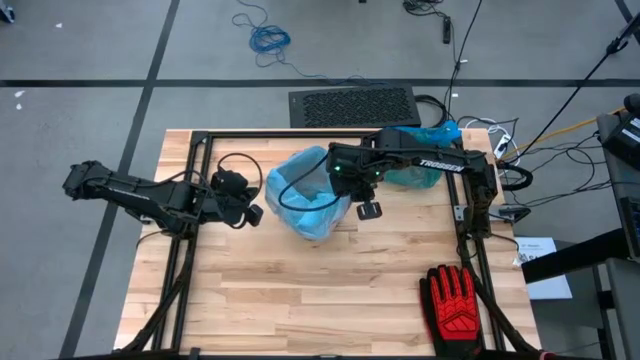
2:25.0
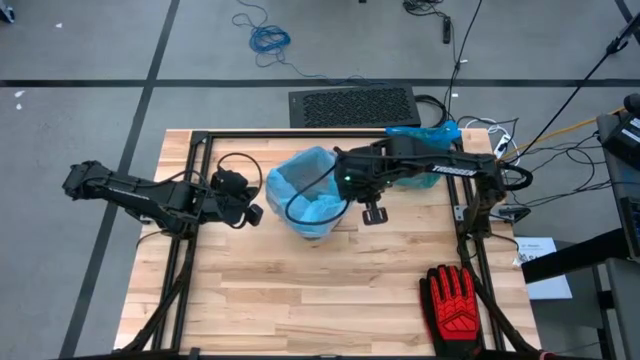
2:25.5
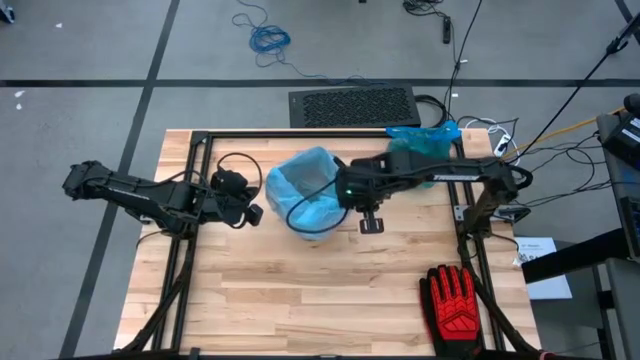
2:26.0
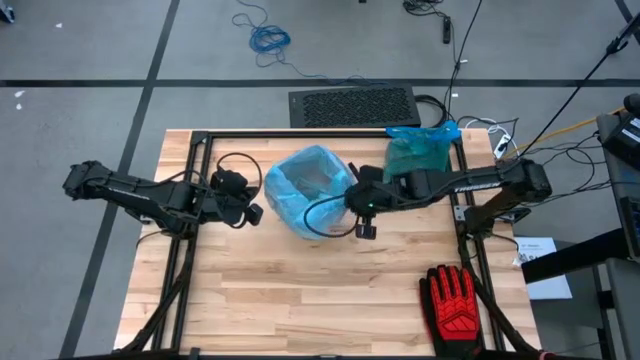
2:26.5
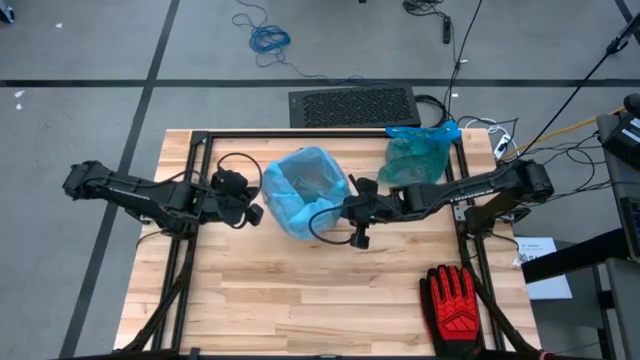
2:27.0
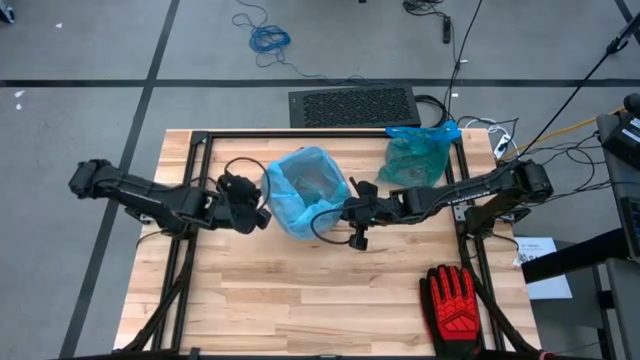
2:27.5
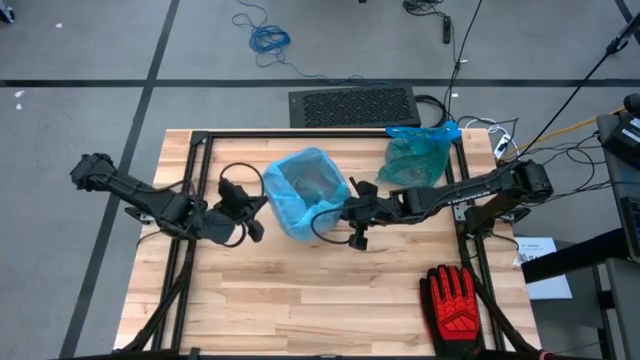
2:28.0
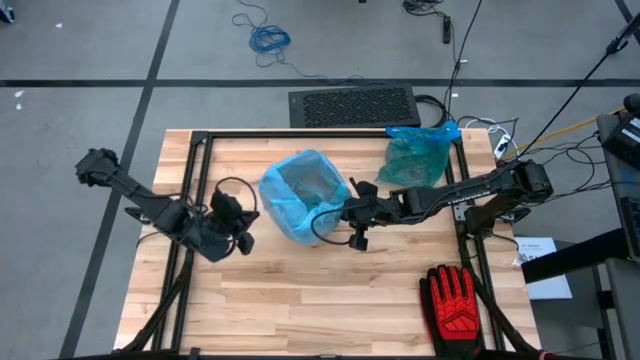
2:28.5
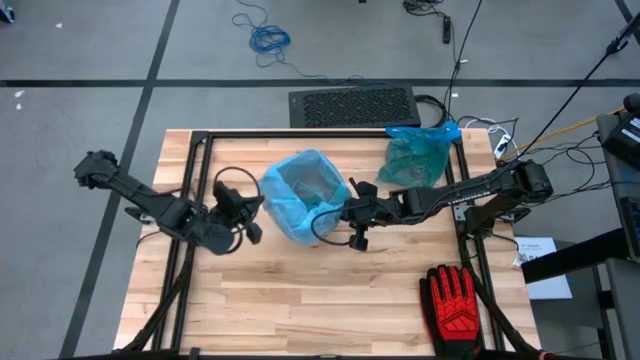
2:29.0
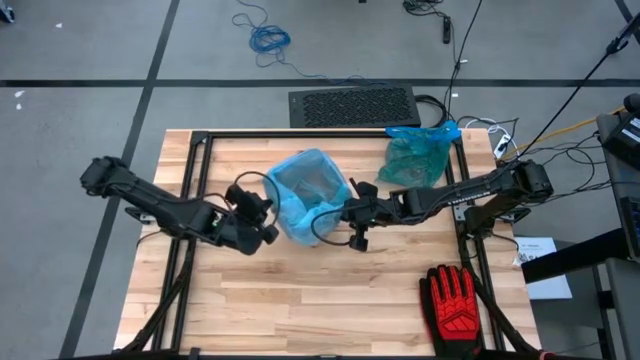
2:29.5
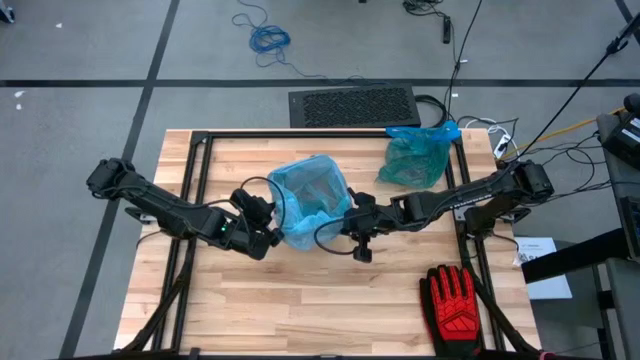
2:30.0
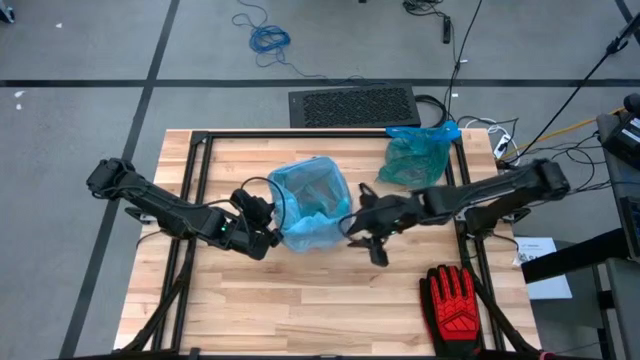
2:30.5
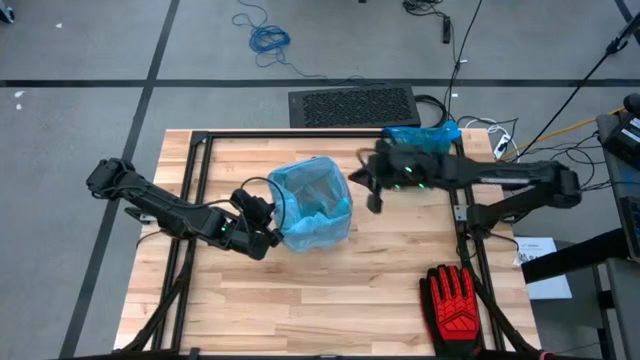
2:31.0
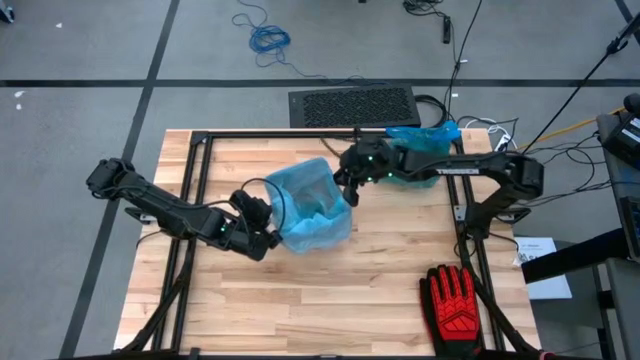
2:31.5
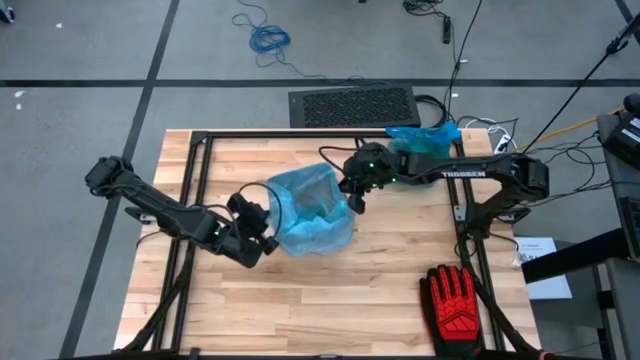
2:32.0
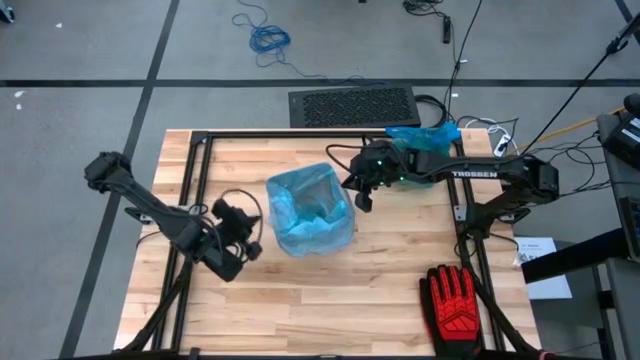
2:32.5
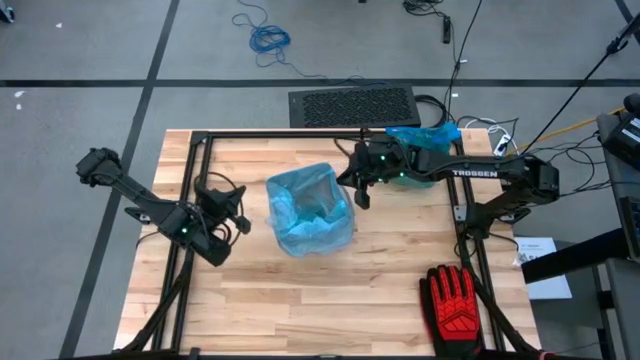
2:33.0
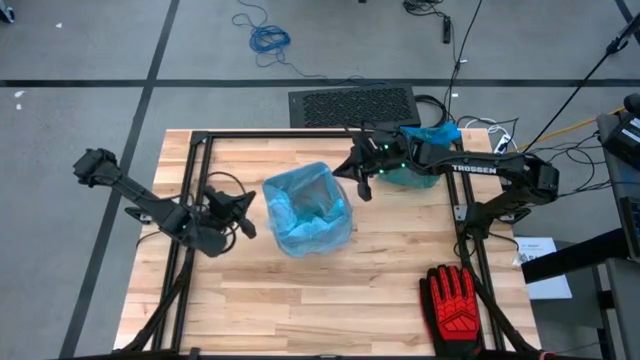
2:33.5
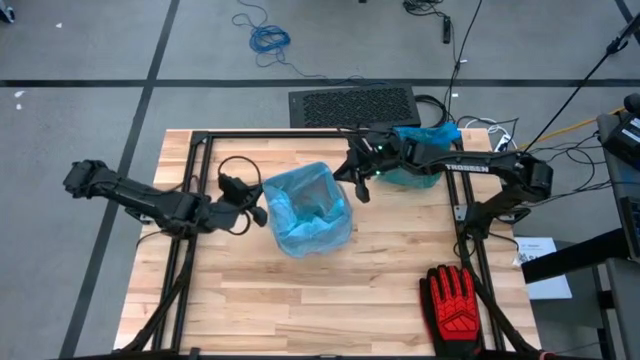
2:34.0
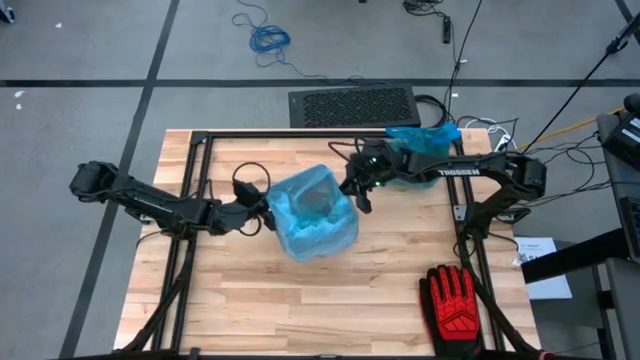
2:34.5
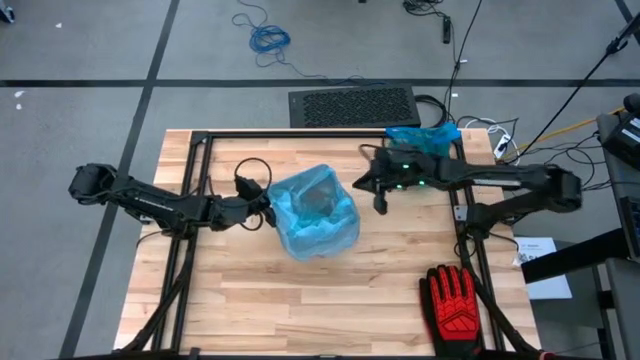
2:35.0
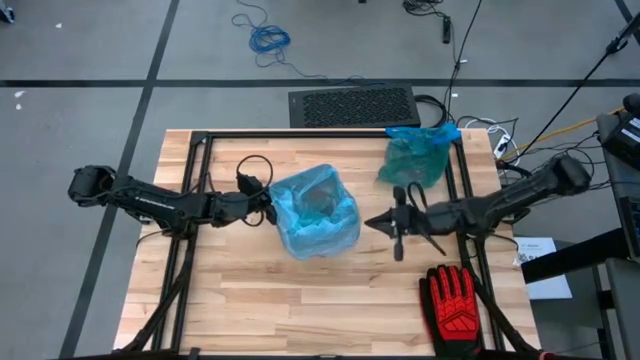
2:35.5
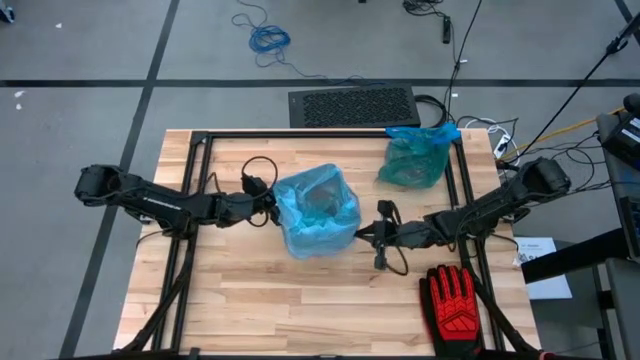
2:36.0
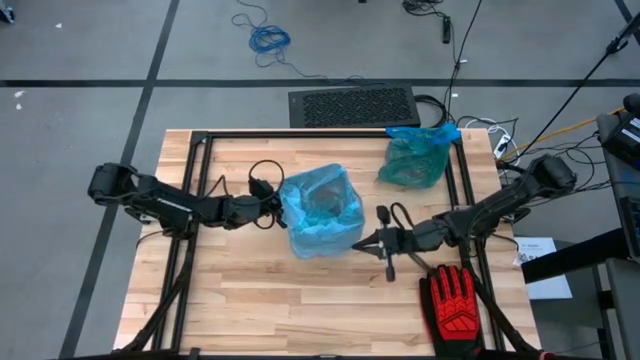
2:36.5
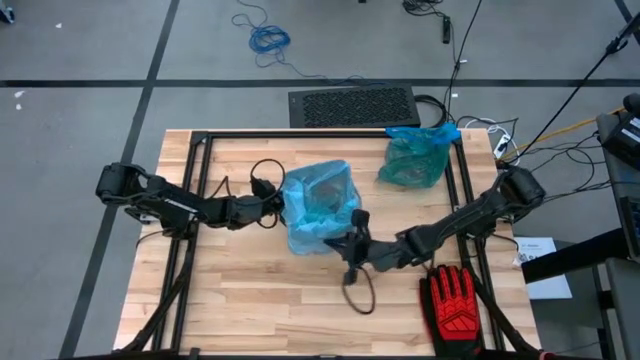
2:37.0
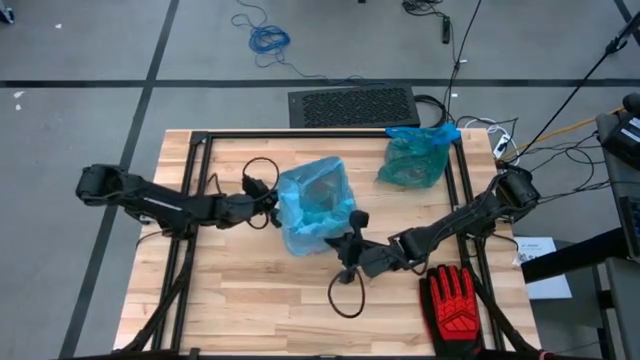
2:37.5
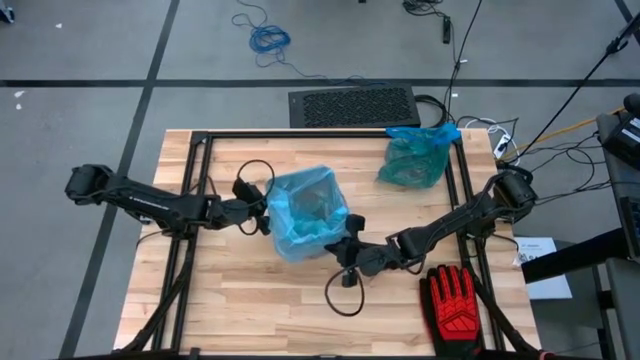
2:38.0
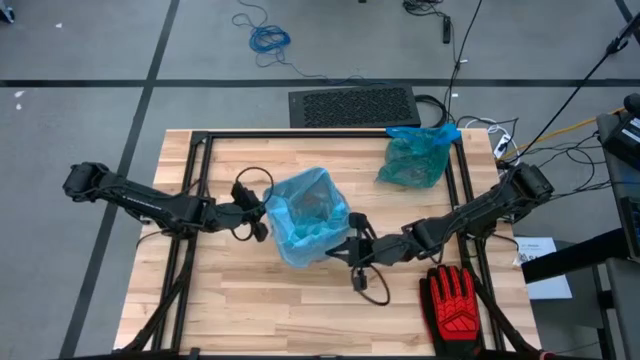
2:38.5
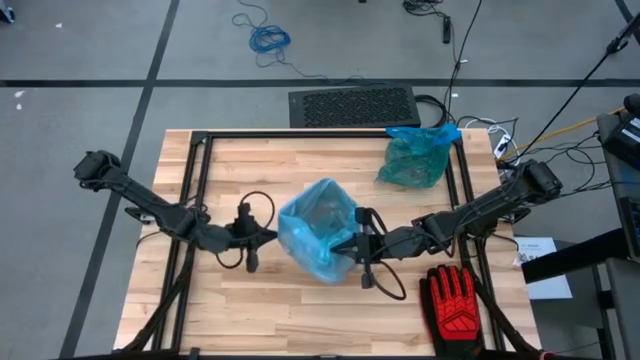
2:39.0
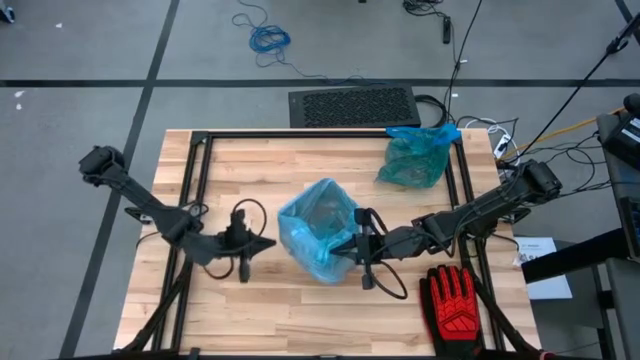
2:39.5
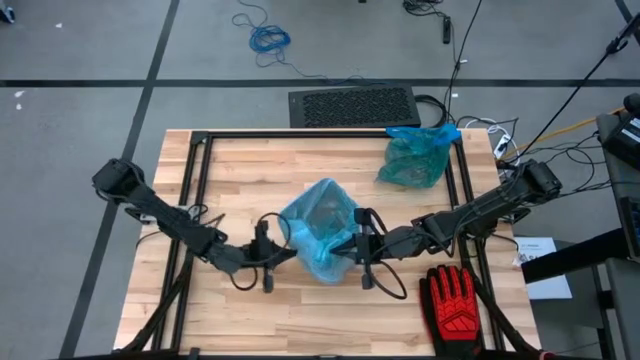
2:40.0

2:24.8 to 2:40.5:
Task: place trash/remove bag and relplace
Insert the blue trash bag into the black trash bin
